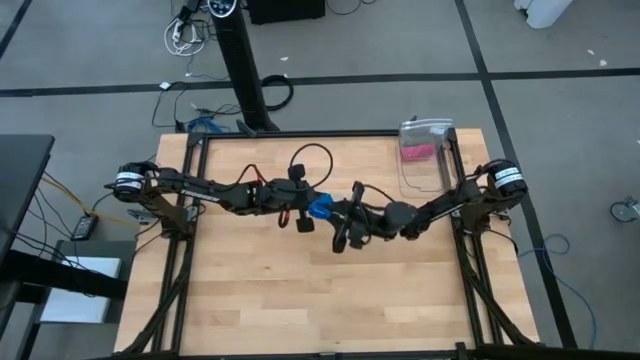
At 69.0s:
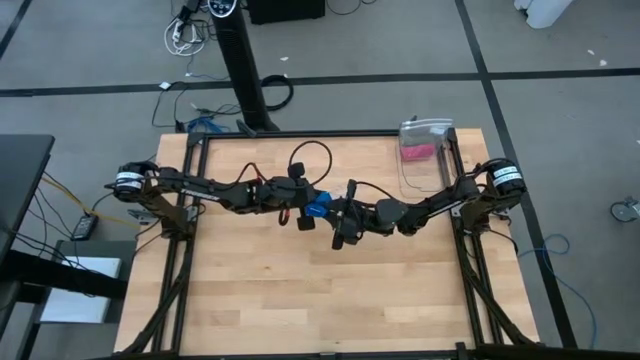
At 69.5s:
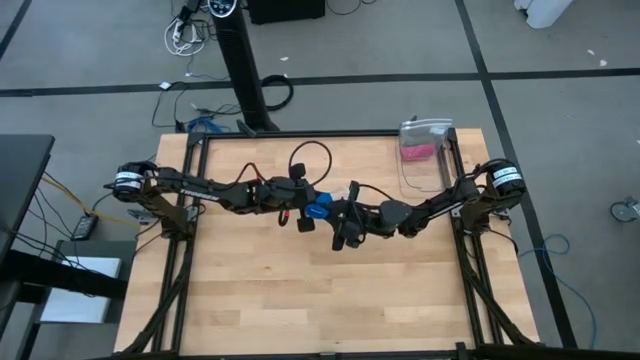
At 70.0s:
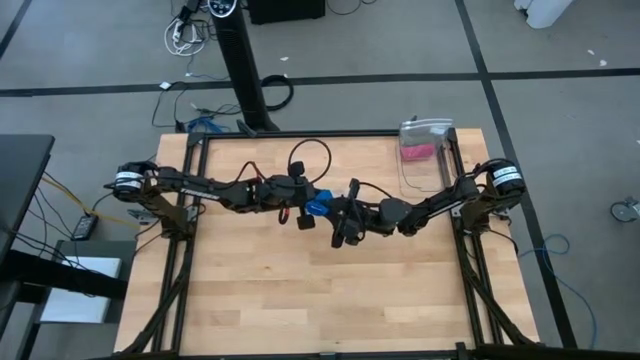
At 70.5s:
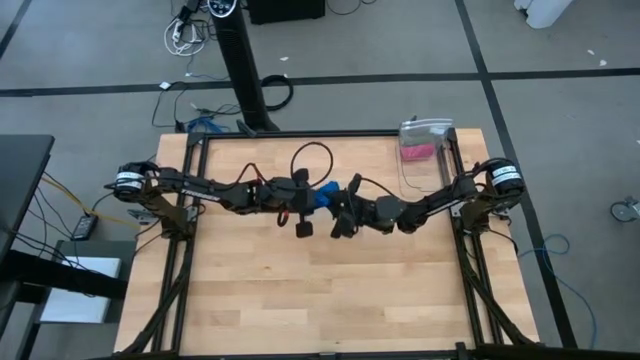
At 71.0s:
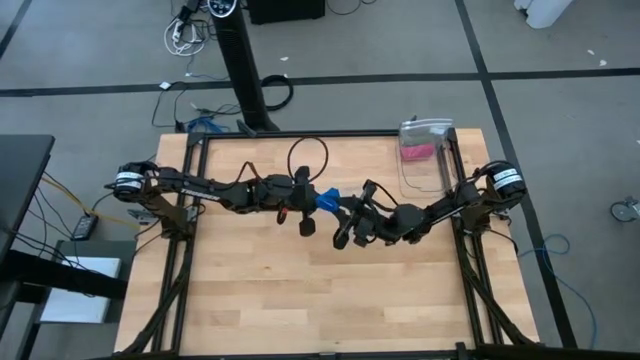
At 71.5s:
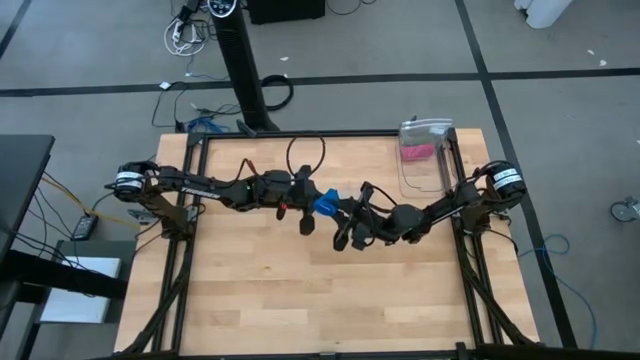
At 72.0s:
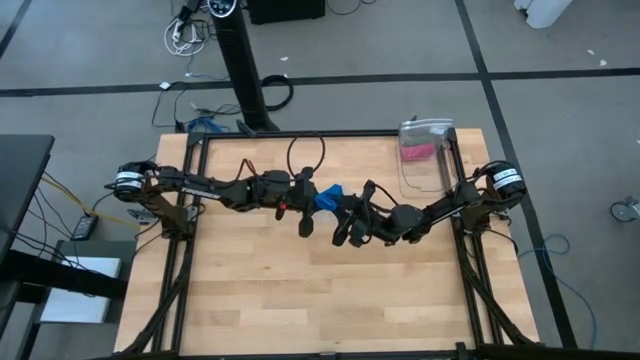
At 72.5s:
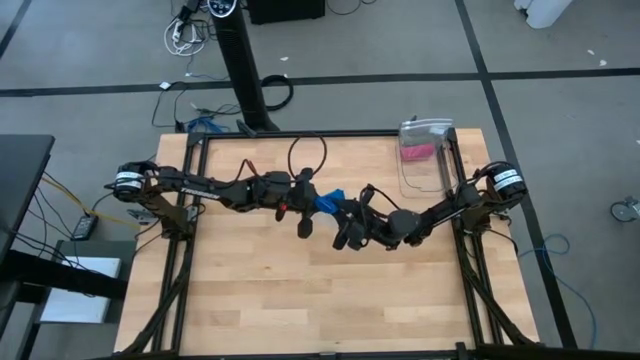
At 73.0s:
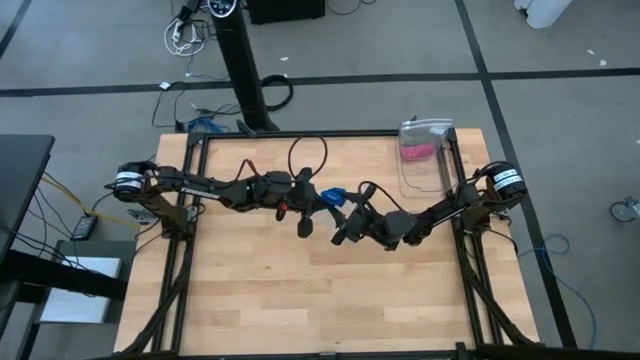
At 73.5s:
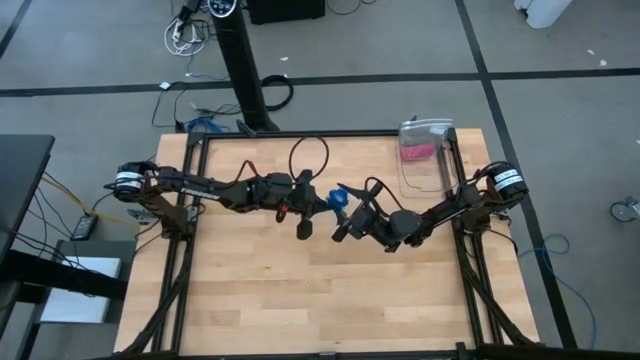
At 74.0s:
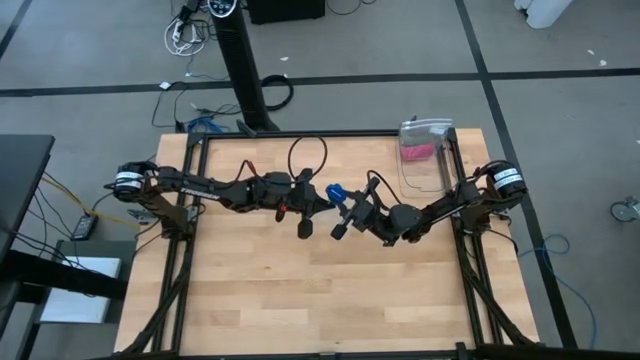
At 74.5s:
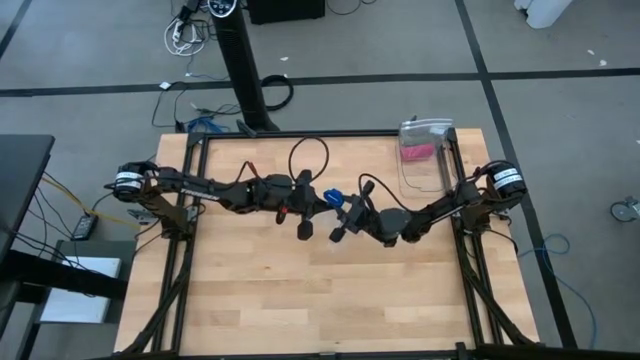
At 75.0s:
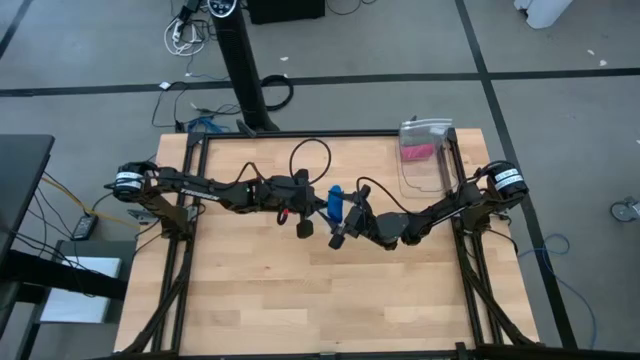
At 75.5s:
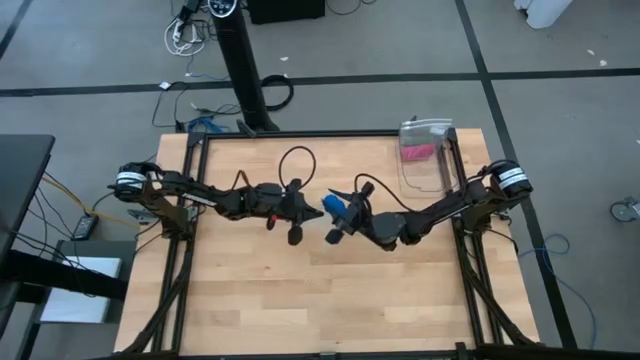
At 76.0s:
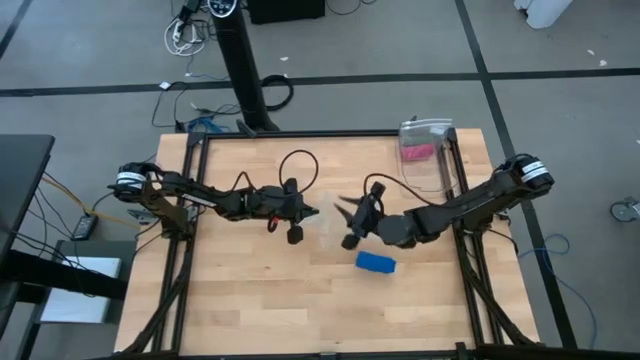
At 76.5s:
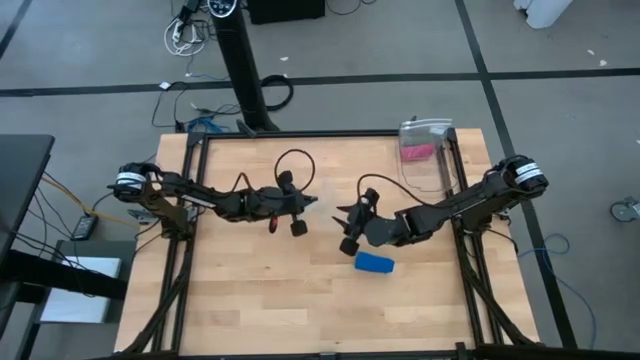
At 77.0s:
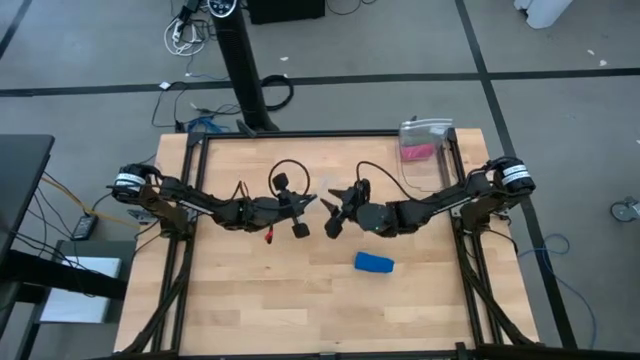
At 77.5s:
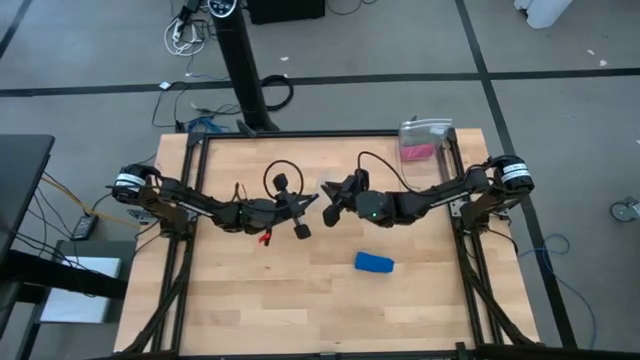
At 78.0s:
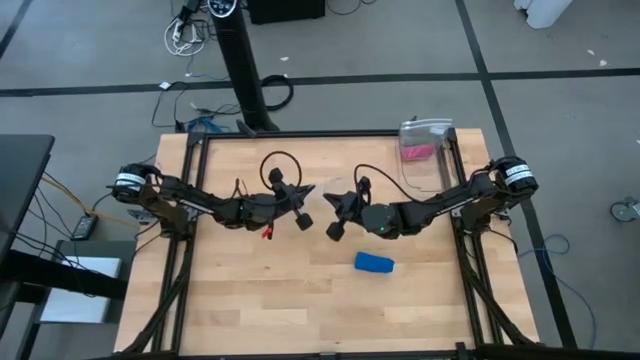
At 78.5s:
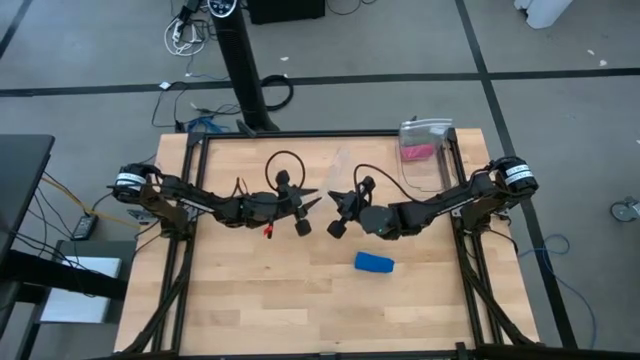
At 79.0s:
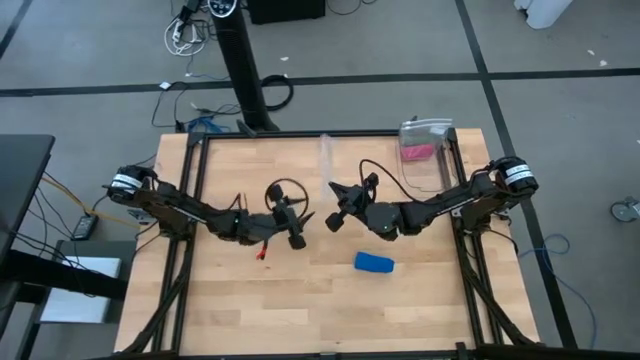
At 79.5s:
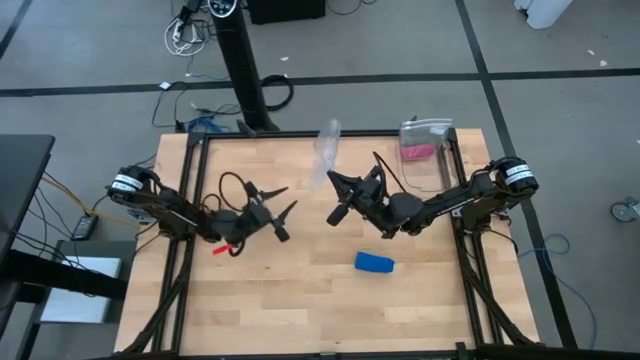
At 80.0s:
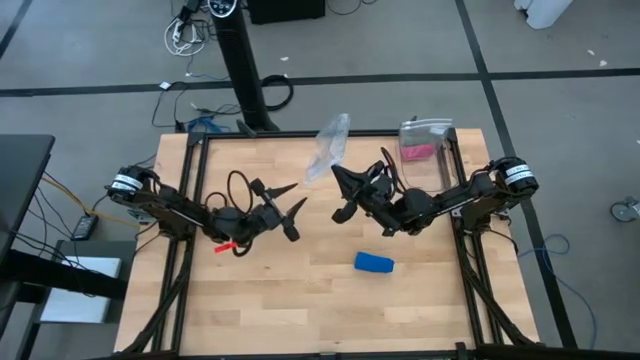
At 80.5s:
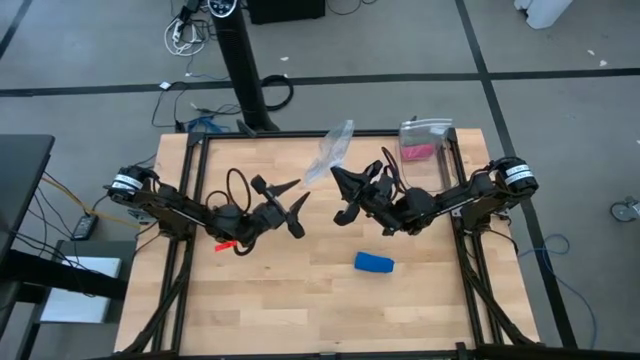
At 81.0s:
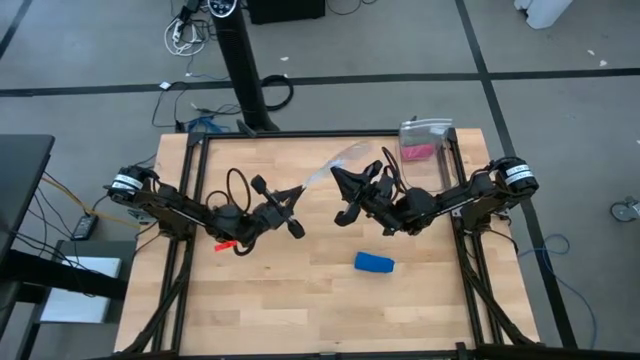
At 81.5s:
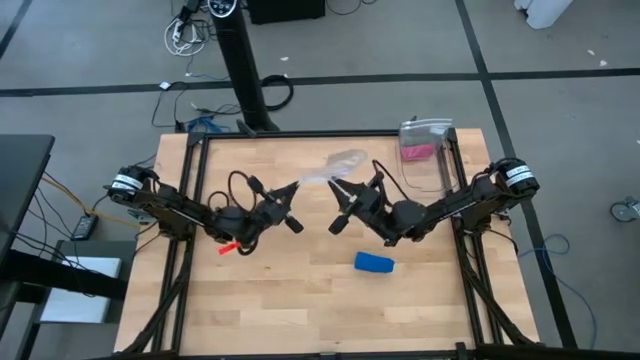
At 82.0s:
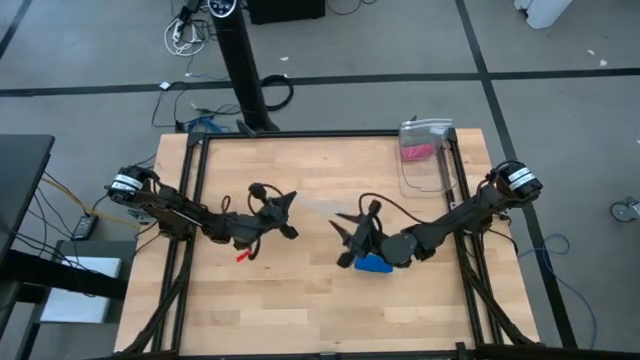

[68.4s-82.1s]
Task: Roll bandage
Put the blue rolled bandage into the transparent zip bag

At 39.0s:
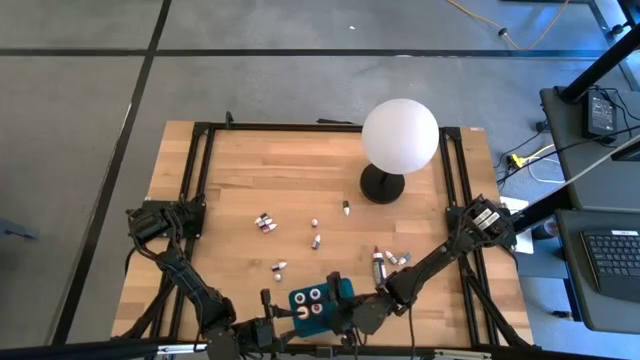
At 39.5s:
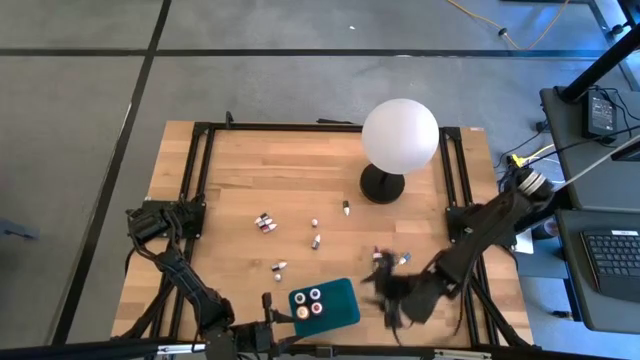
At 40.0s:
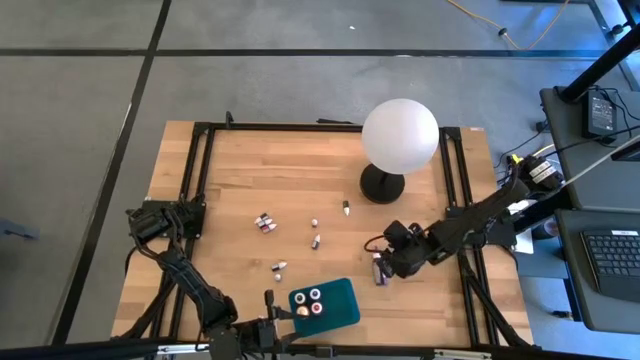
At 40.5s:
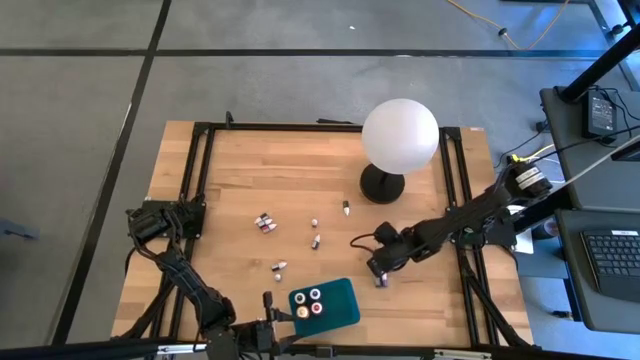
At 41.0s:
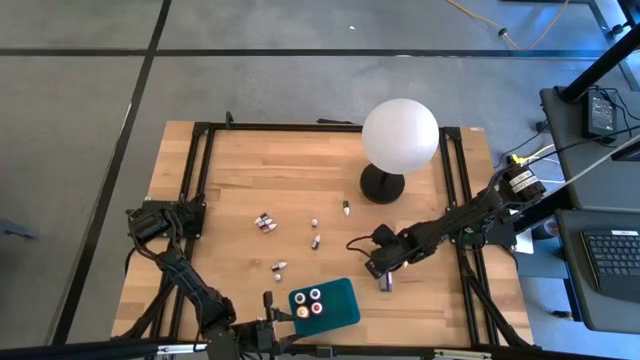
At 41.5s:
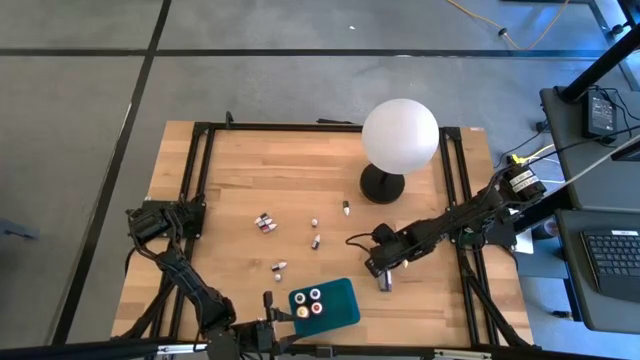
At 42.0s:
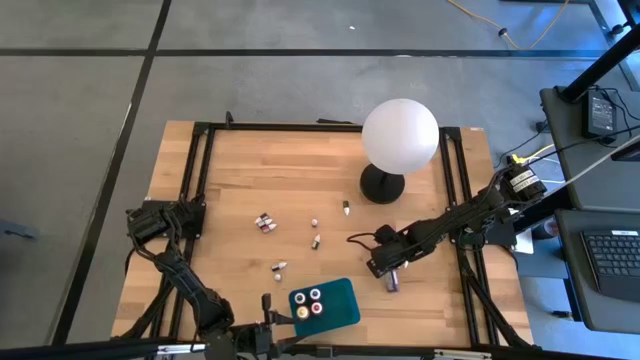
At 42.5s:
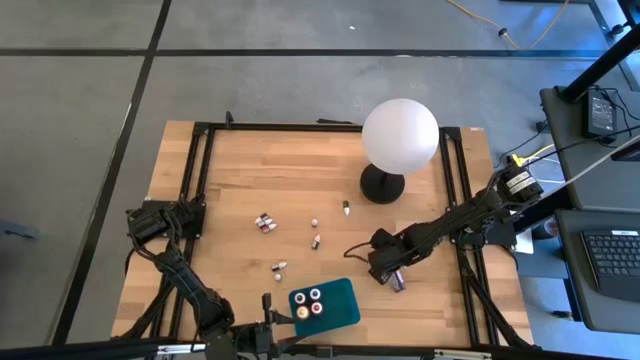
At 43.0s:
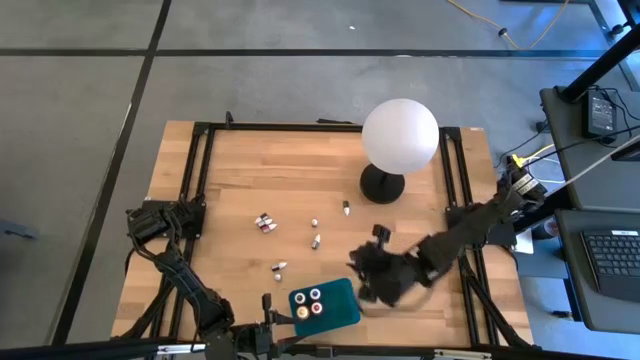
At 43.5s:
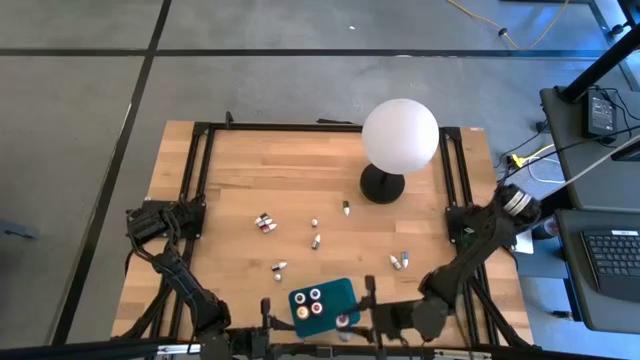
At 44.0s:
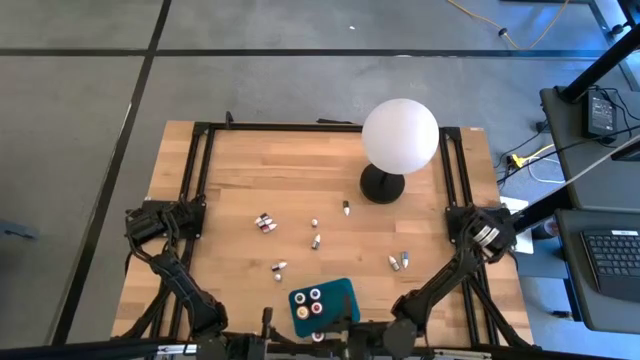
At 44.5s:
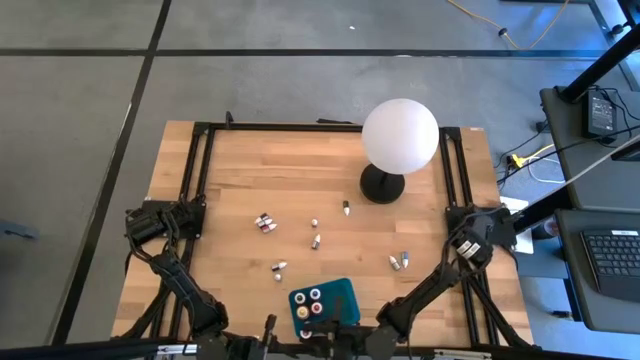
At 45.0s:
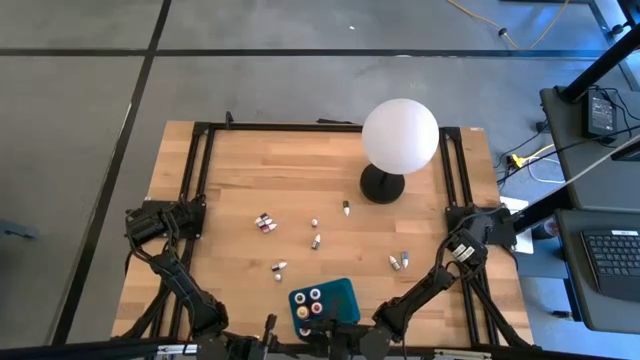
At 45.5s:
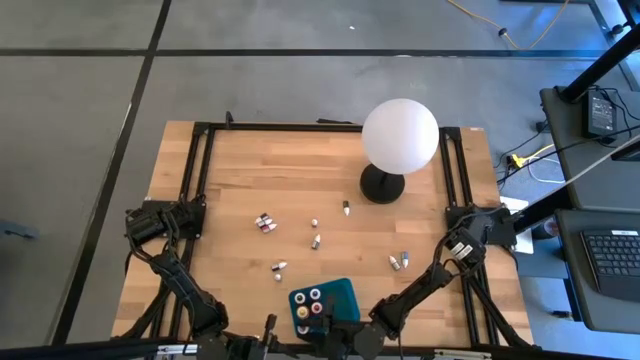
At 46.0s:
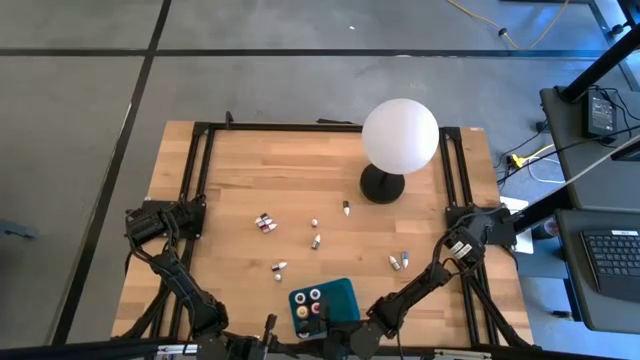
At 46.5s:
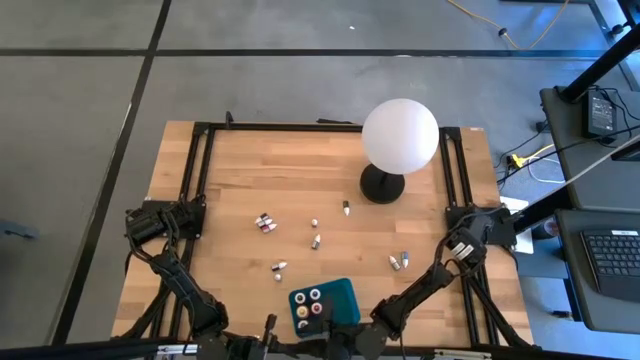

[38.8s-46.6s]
Task: Pick & Place food coloring
Put the large purple food coloring bottle into the blue bin

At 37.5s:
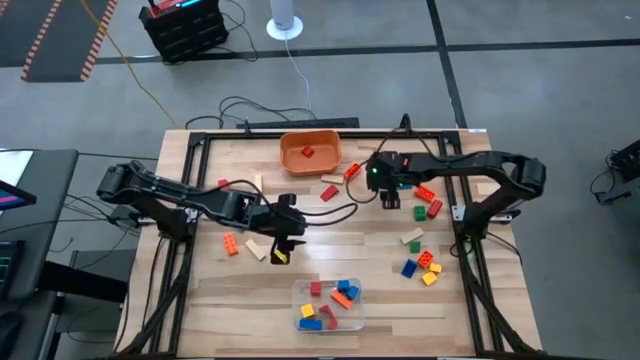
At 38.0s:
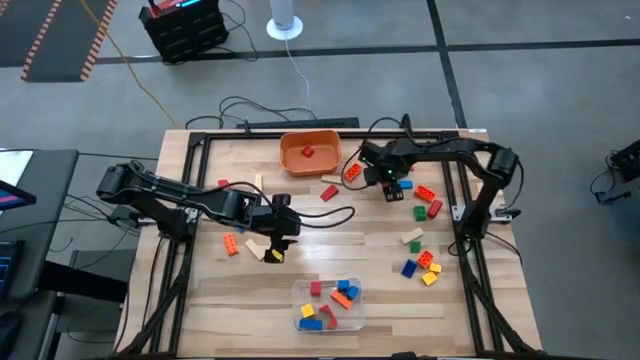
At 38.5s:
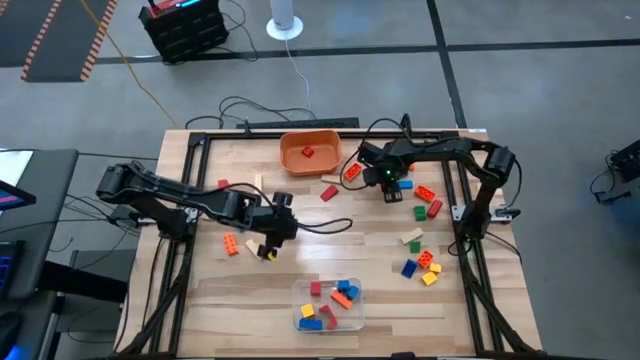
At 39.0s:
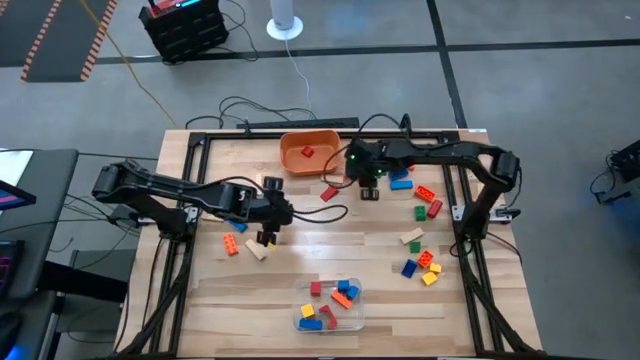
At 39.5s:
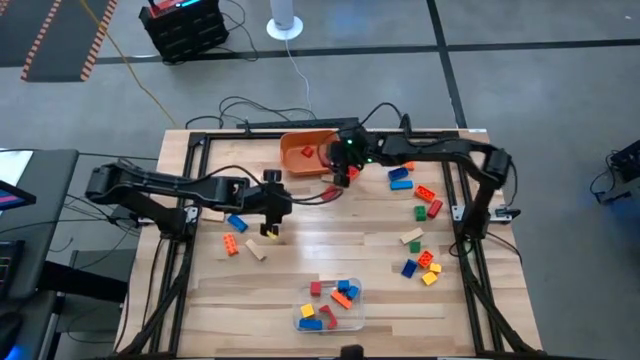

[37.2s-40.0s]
Task: Sort blocks by size
Put the small red wooden block into the orange bin
